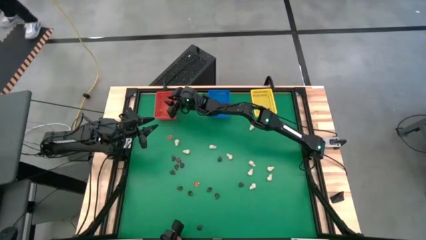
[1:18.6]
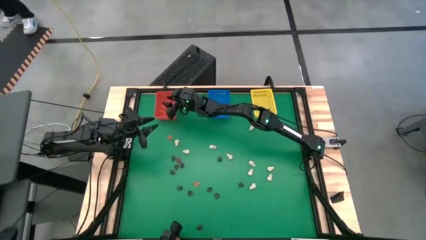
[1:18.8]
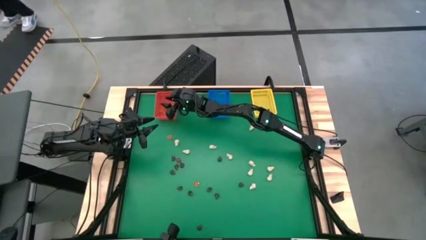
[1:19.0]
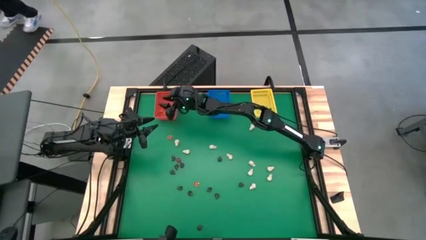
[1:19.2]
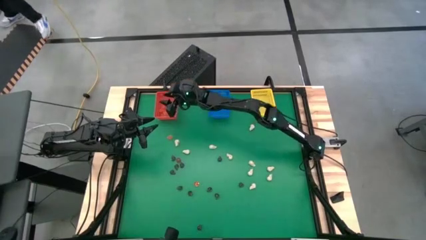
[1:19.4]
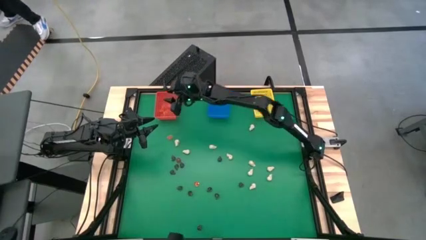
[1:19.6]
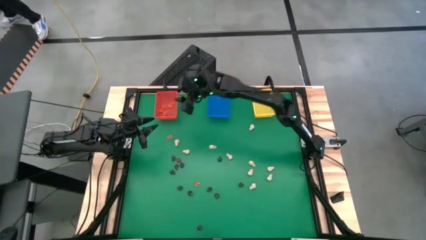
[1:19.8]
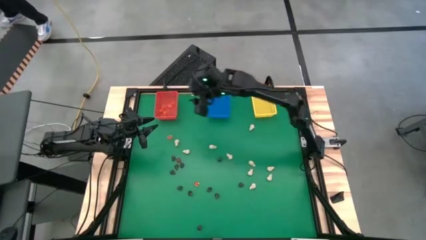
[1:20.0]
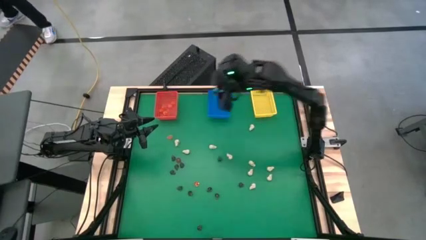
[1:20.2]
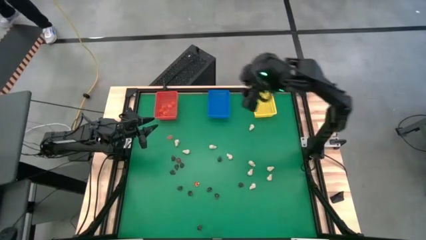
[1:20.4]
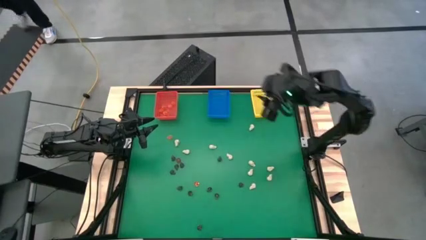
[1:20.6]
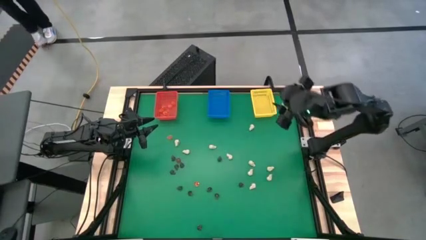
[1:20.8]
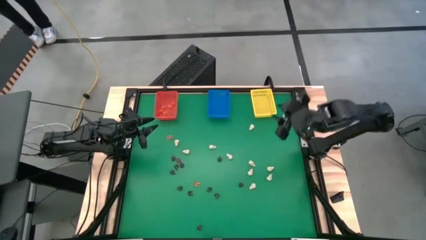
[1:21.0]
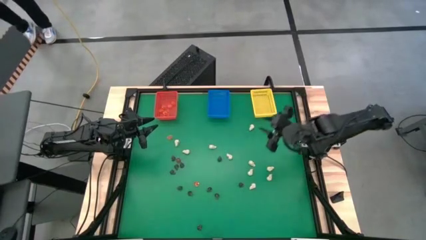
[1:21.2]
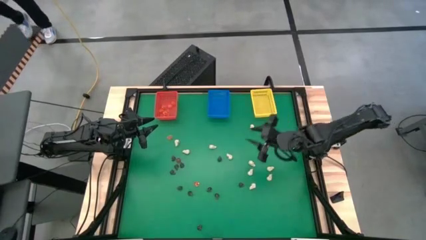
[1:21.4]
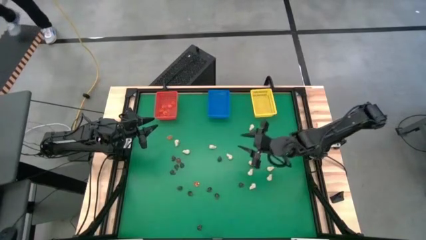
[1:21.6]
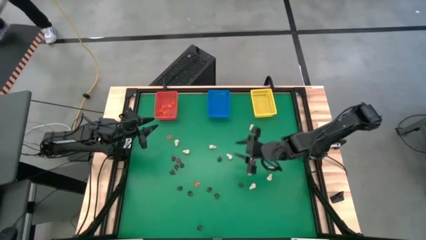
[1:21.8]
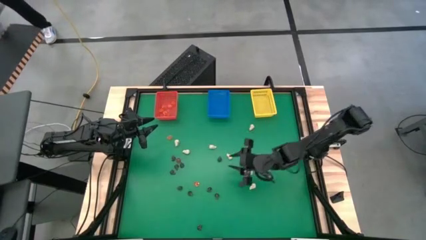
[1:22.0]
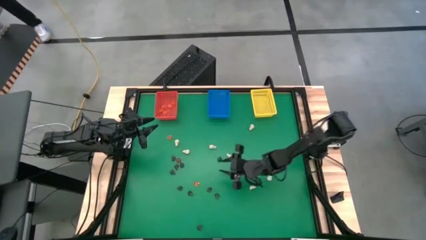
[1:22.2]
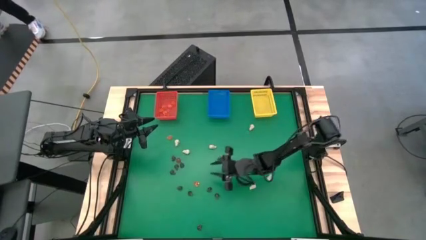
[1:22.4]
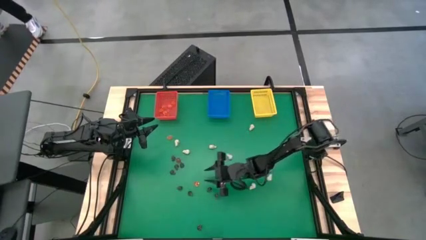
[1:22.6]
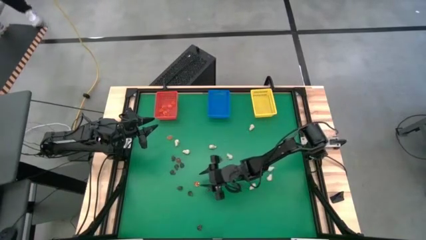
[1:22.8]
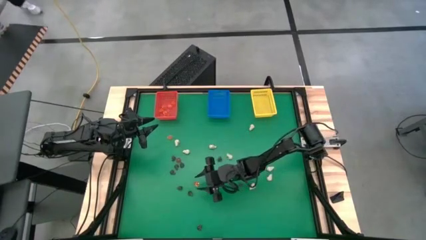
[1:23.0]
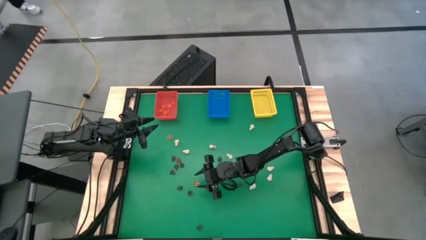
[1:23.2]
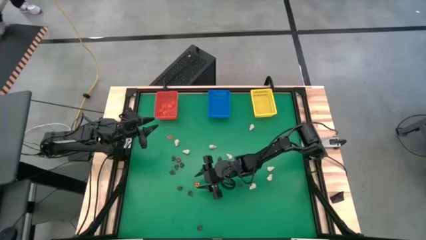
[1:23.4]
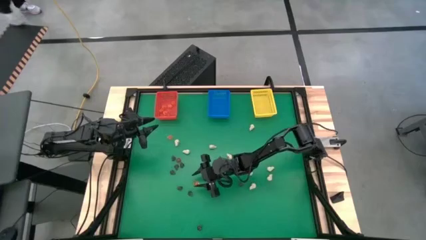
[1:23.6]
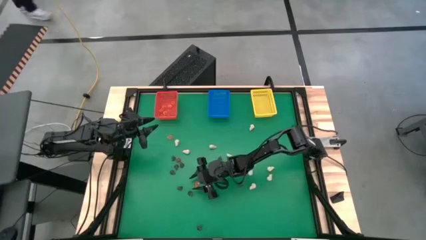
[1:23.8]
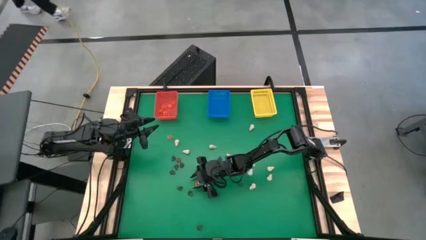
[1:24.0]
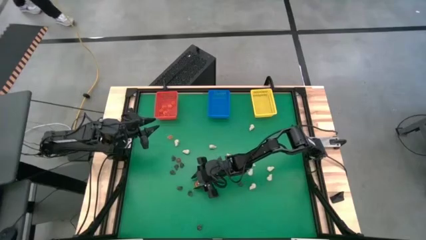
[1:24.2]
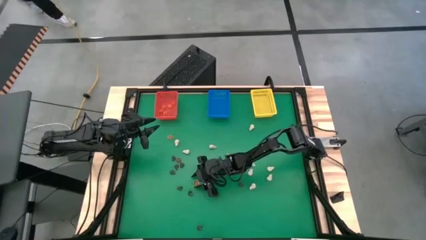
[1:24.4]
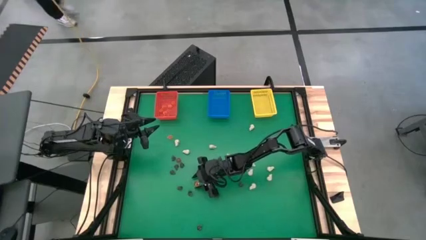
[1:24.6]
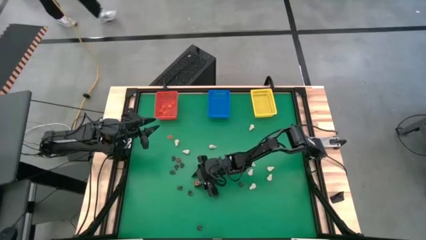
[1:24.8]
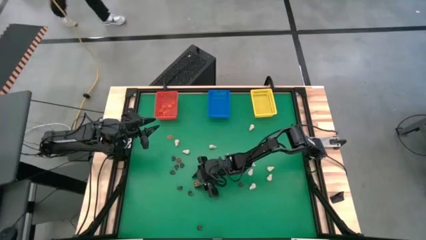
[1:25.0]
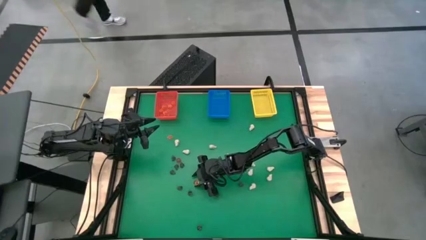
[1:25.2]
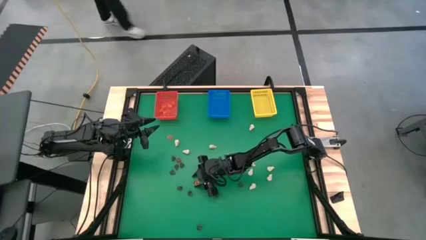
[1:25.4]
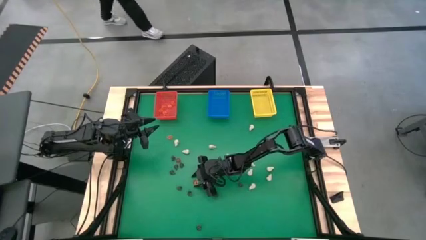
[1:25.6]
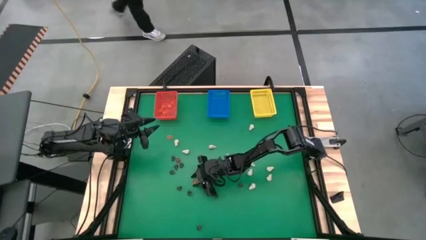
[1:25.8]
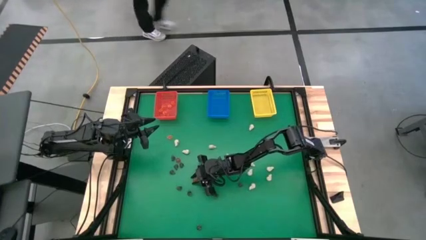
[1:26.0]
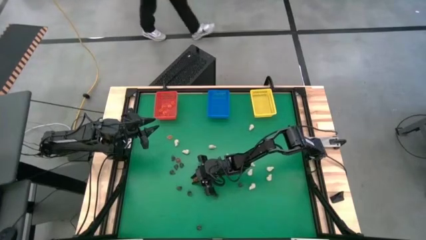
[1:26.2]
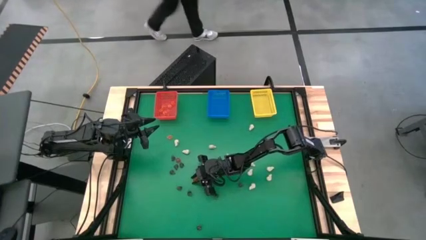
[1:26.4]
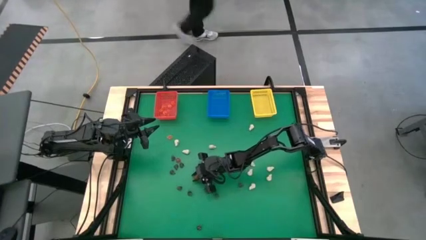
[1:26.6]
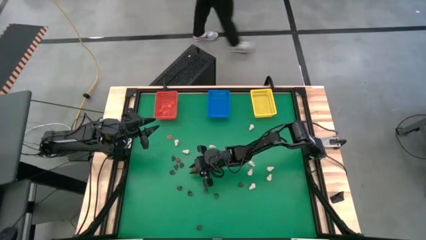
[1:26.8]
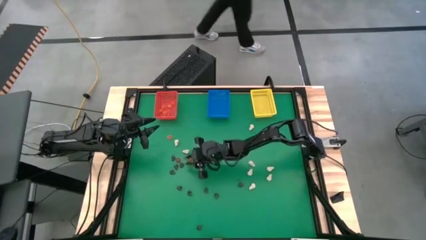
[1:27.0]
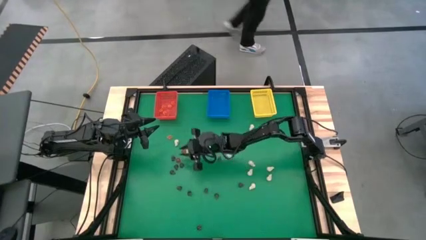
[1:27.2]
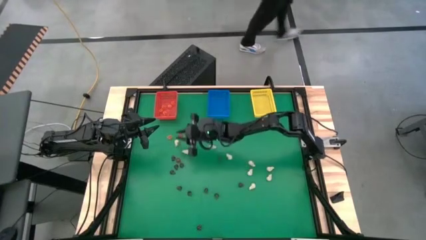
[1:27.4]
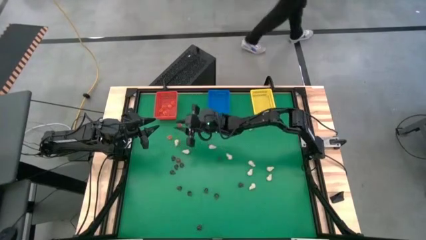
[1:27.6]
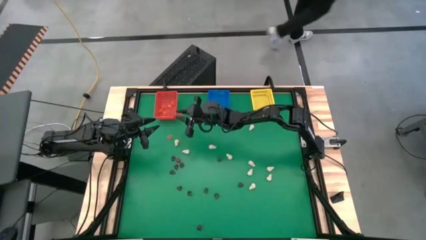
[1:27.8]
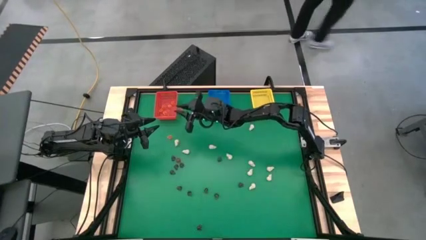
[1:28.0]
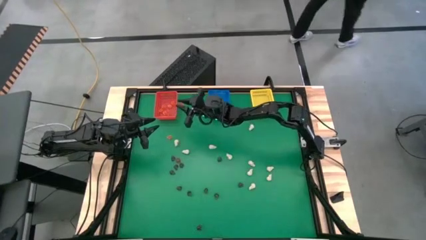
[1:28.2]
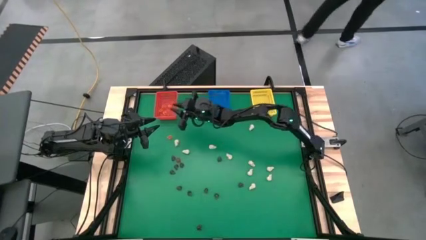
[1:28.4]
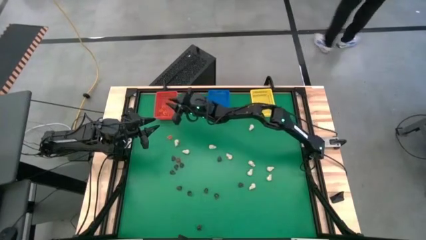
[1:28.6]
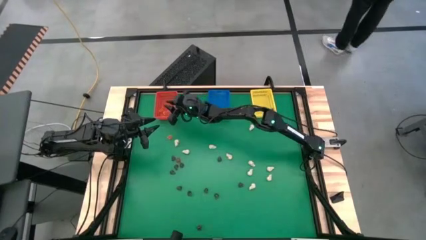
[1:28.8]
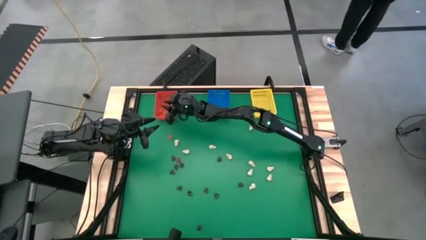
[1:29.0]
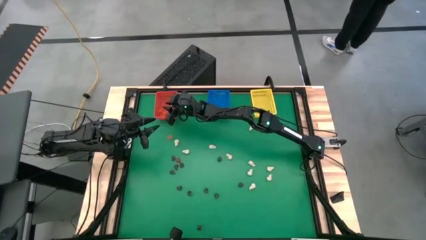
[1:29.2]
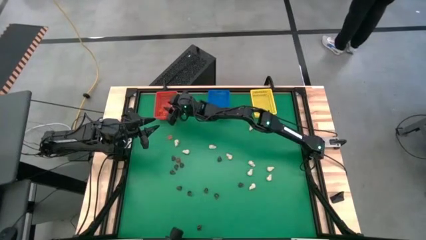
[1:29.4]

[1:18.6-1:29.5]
Task: Sort Halloween decoration
Put the orange pumpkin toy into the red bin
